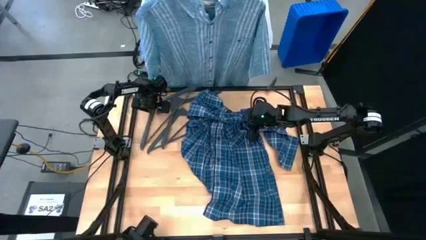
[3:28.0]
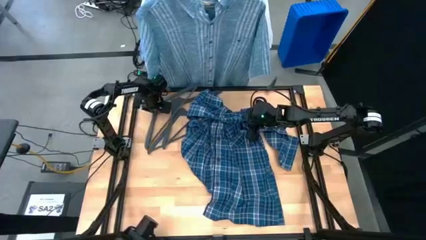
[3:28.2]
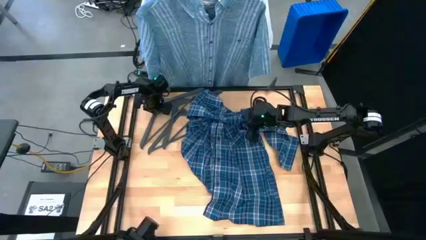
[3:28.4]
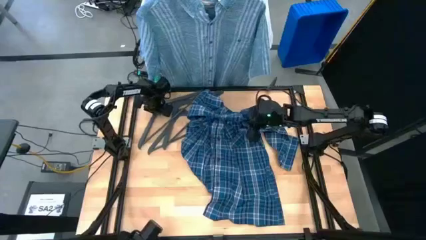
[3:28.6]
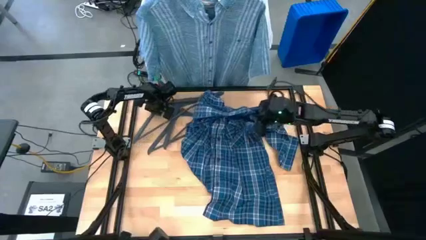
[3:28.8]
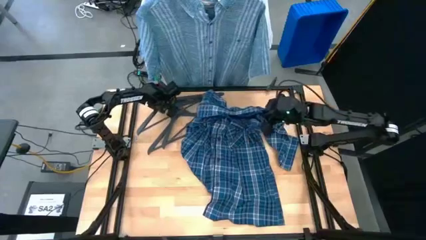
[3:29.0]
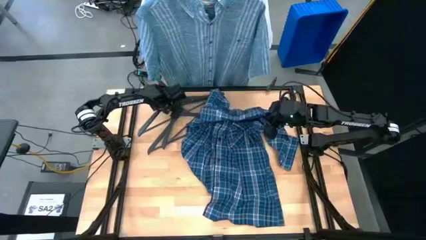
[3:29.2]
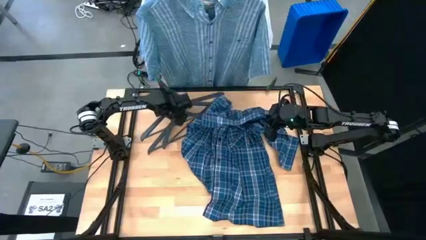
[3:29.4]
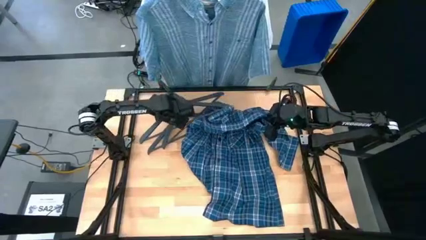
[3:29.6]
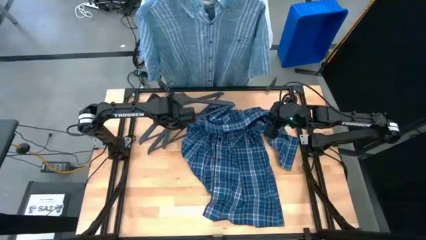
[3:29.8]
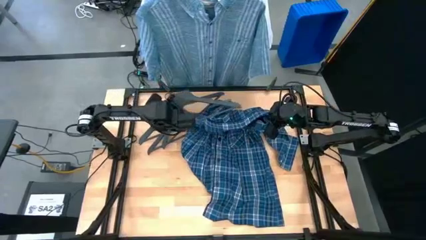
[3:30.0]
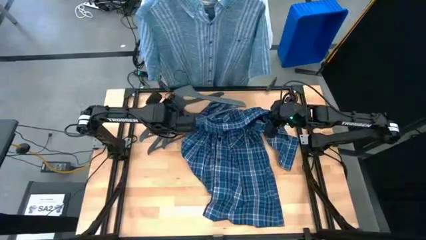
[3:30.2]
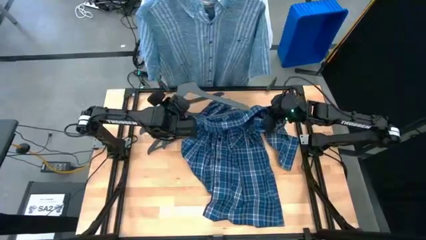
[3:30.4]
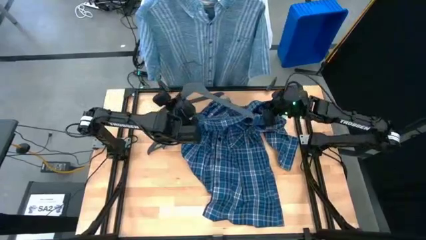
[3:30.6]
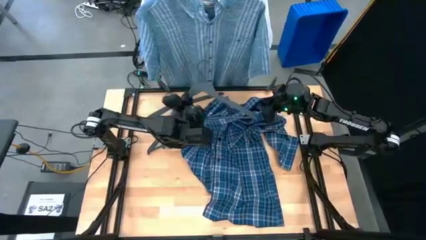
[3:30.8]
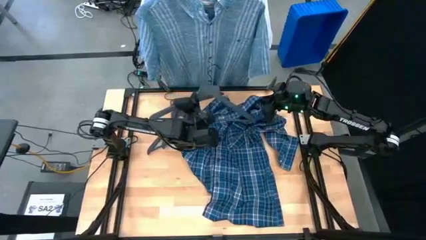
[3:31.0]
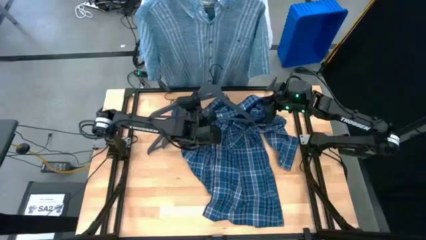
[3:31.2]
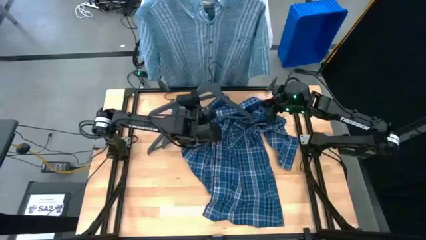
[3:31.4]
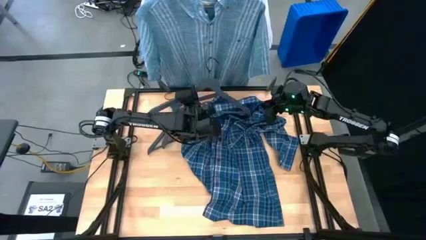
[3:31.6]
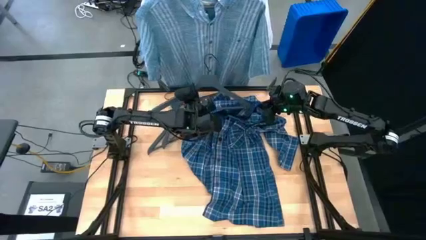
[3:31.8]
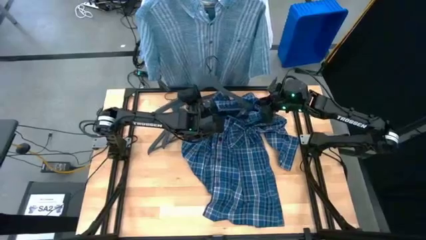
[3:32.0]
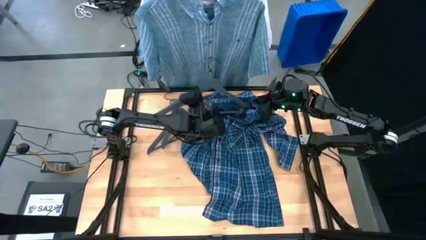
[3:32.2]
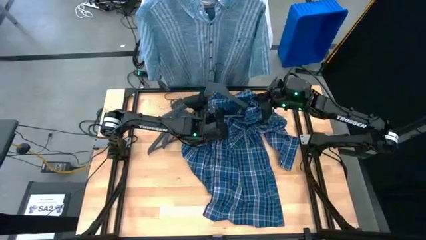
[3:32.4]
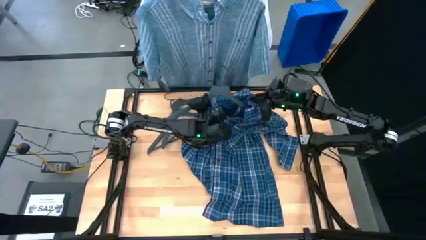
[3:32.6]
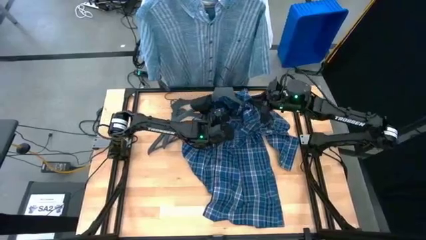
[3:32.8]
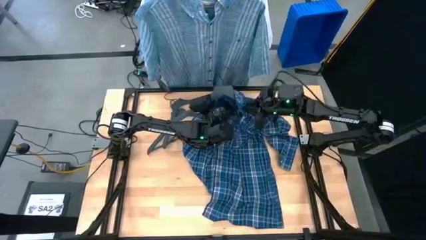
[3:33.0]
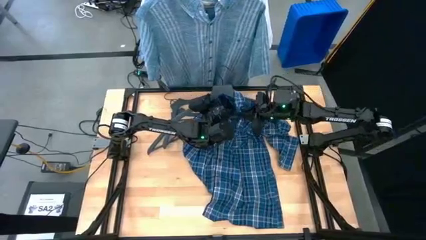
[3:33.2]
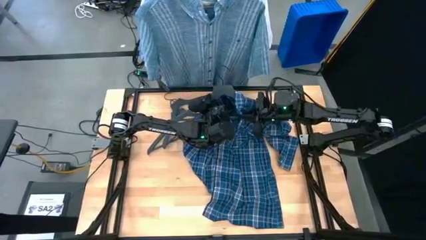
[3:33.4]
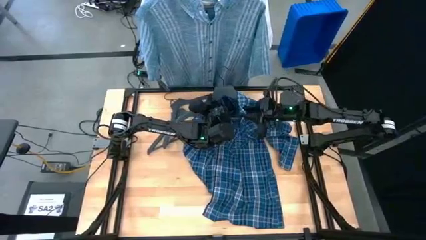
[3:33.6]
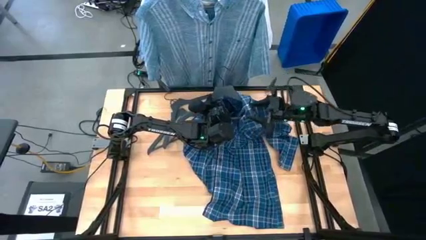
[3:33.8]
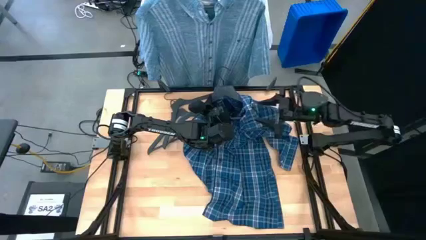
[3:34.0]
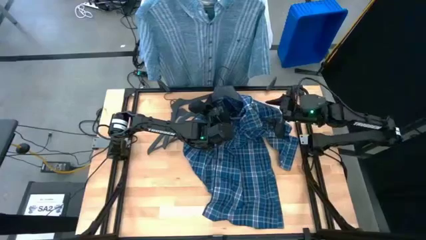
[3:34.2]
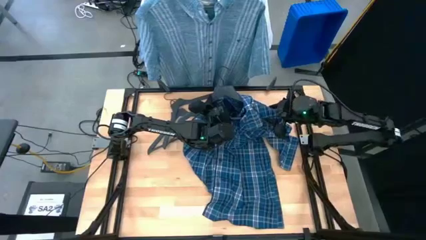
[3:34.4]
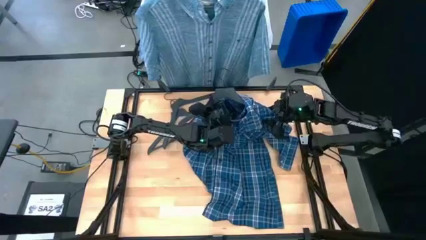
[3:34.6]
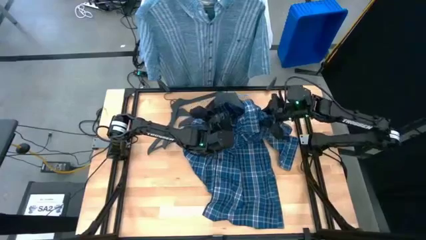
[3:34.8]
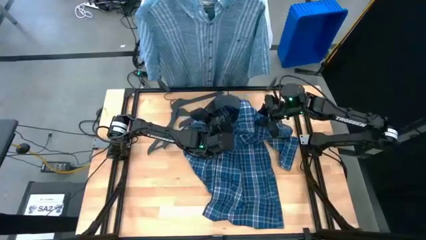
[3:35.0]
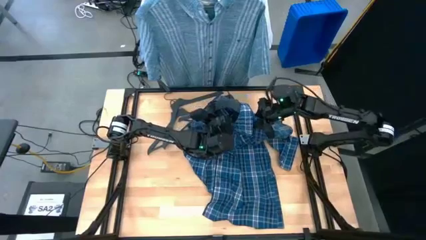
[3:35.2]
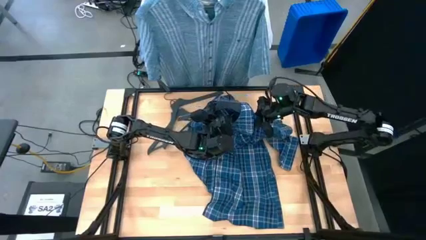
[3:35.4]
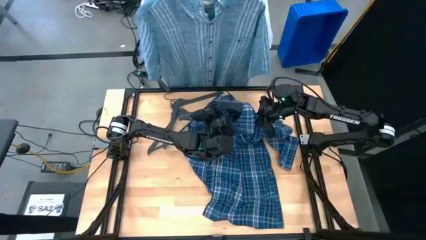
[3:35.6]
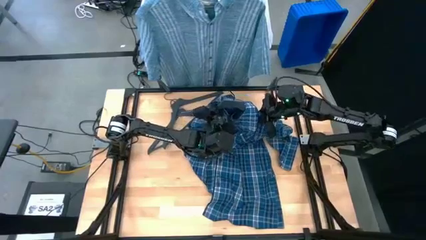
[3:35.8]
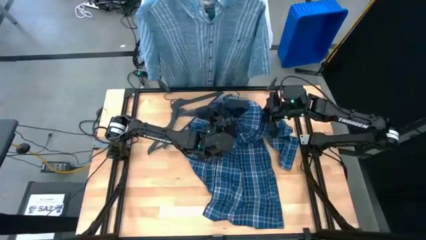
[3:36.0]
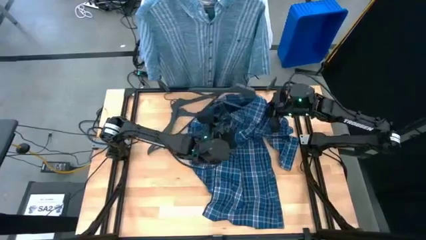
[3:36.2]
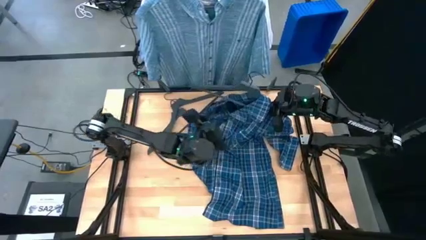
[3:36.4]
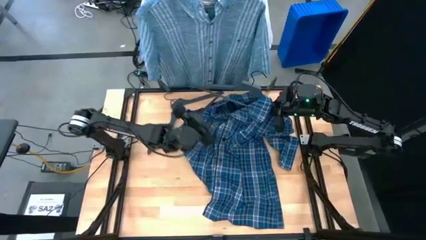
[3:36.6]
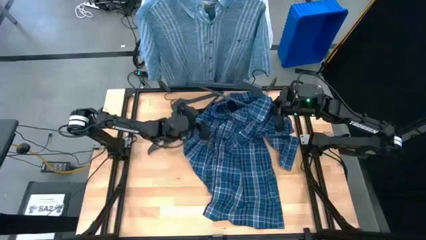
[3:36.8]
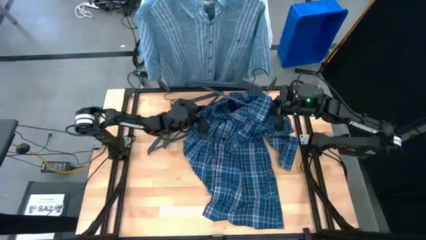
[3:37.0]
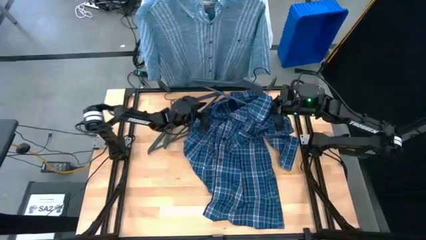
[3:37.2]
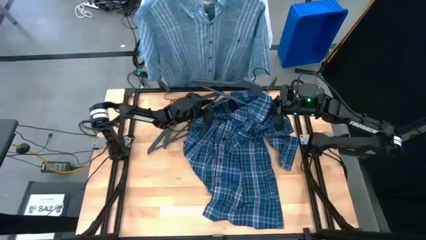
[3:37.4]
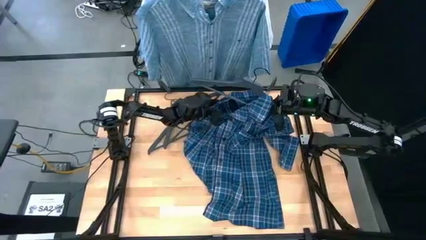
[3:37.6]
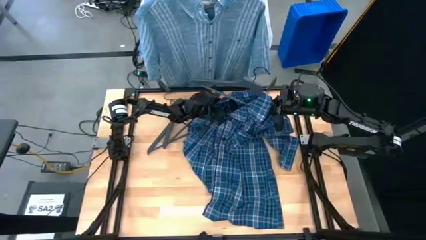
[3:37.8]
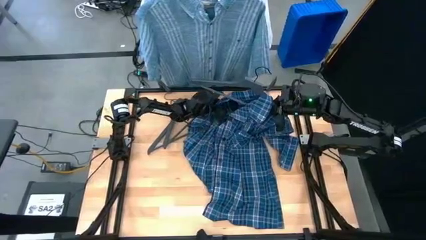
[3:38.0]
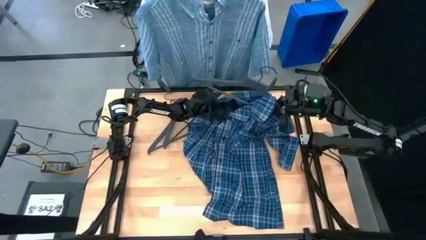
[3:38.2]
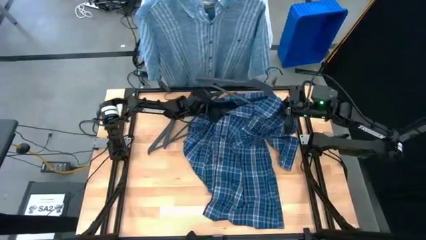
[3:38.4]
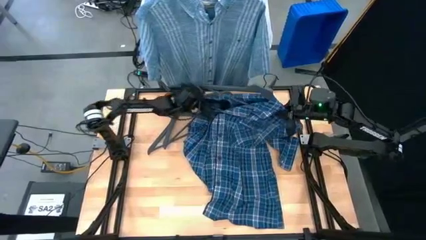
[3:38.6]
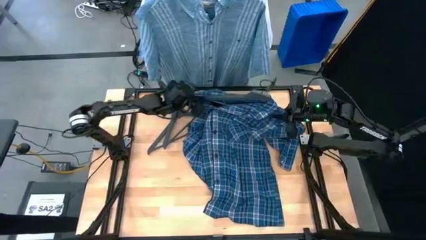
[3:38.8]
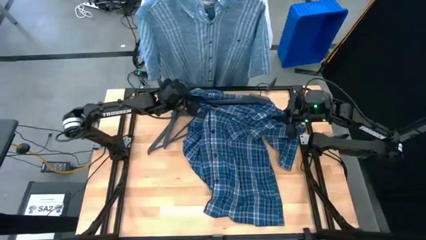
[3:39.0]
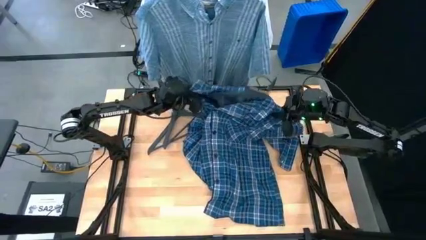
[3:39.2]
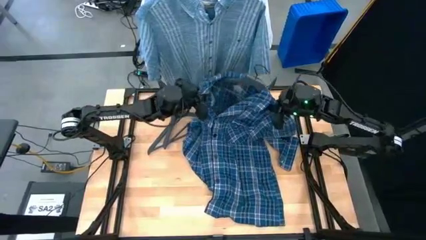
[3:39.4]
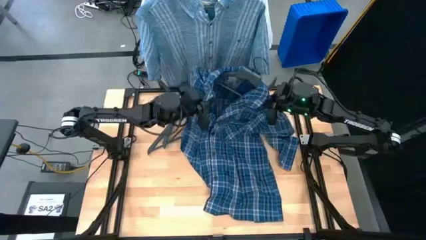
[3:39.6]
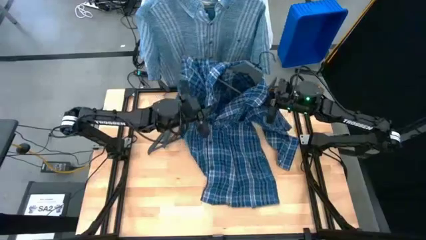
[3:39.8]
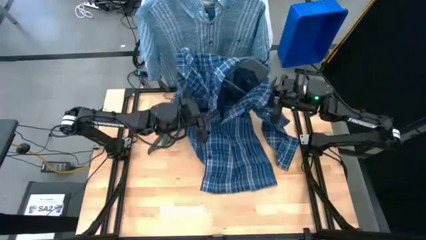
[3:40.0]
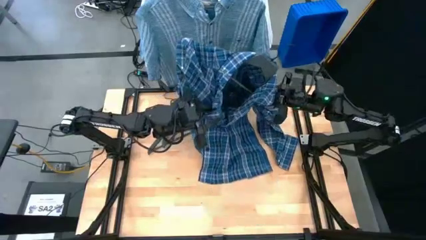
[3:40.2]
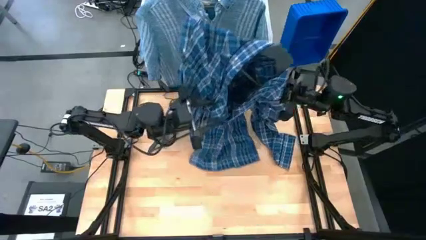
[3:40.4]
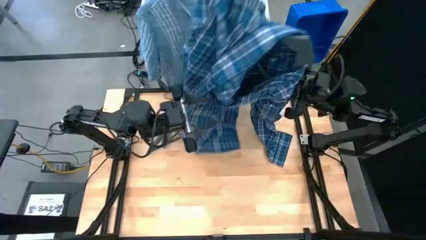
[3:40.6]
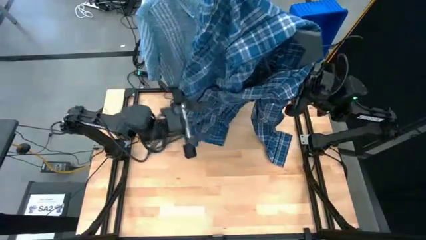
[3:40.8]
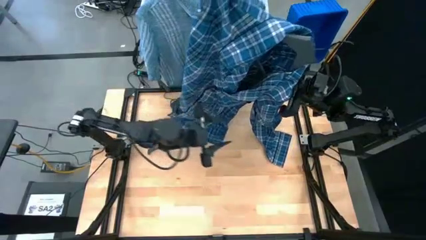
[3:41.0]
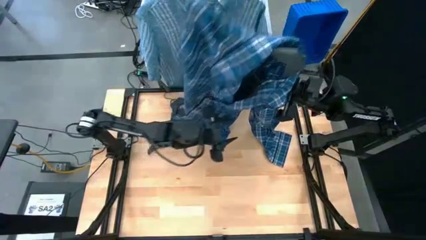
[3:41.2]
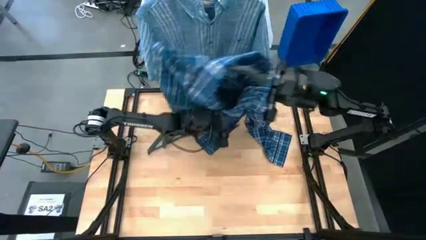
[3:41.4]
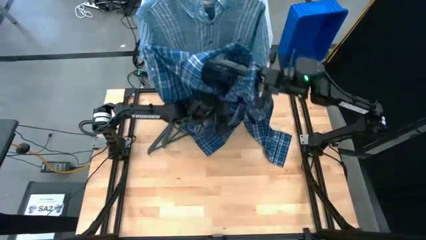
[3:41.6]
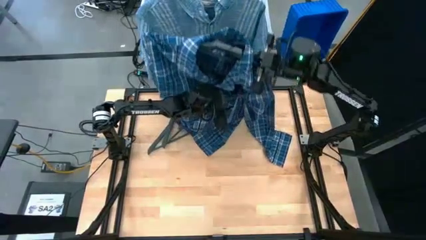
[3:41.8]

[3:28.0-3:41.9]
Task: Hang clothes
Insert the black hanger into the blue shirt

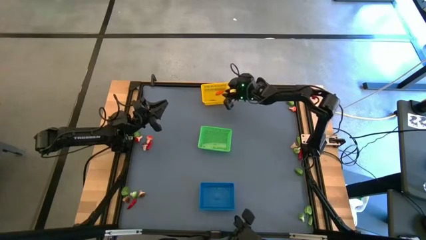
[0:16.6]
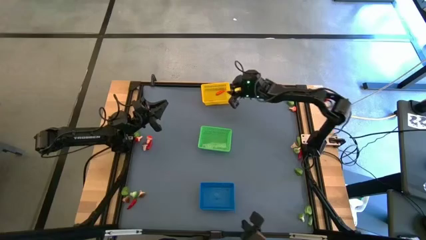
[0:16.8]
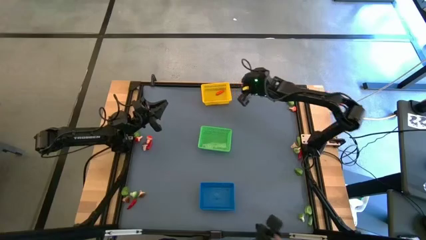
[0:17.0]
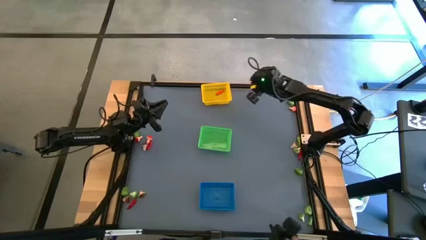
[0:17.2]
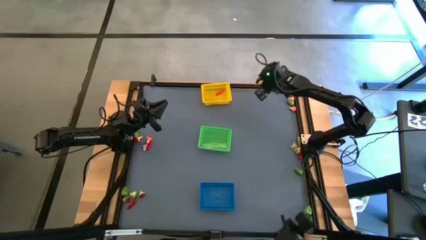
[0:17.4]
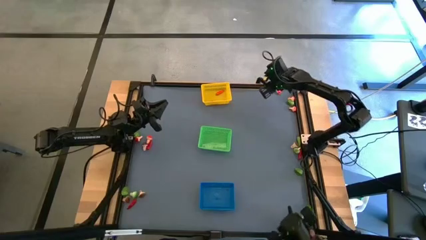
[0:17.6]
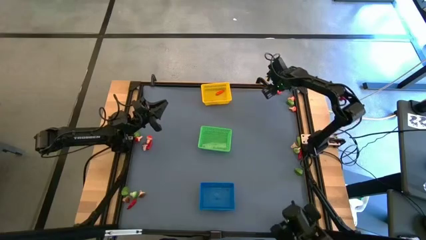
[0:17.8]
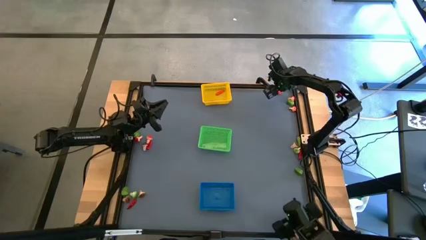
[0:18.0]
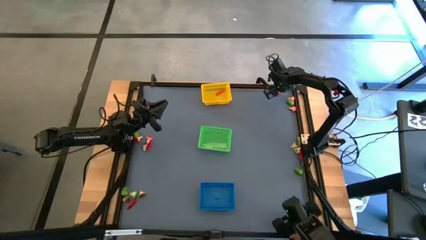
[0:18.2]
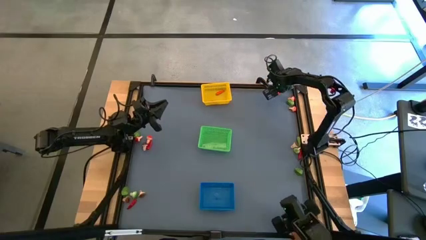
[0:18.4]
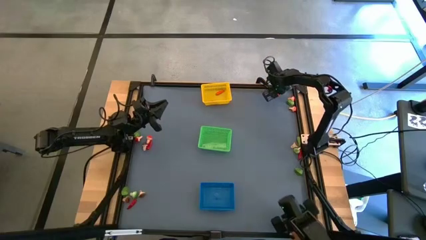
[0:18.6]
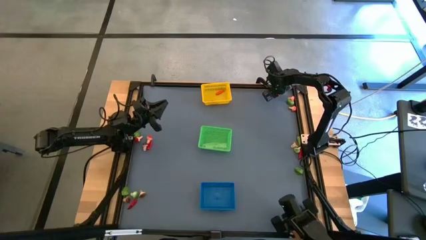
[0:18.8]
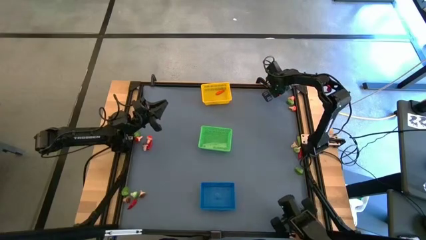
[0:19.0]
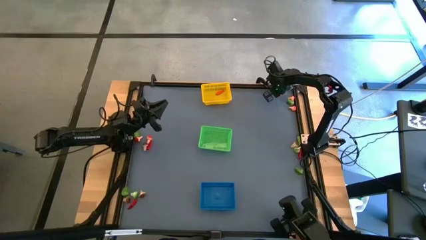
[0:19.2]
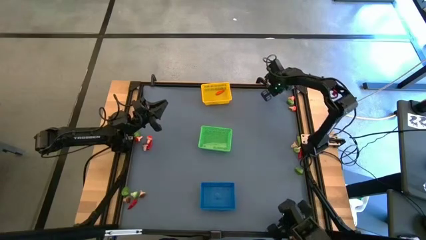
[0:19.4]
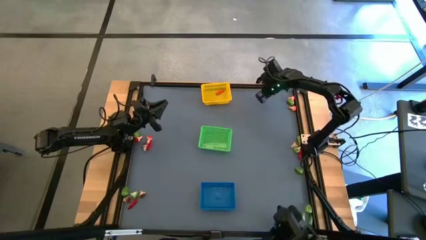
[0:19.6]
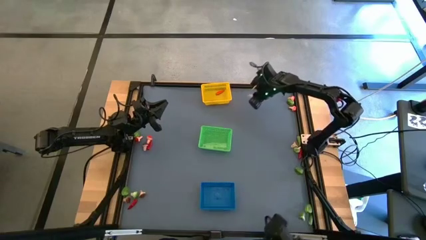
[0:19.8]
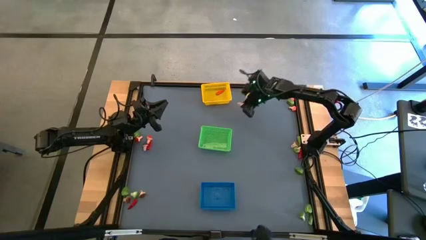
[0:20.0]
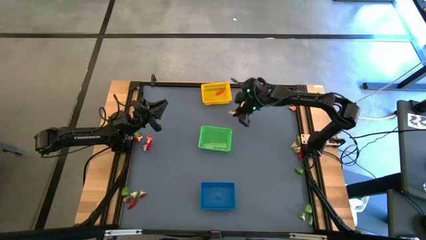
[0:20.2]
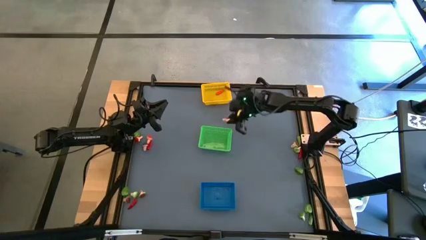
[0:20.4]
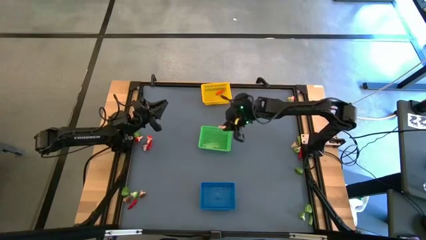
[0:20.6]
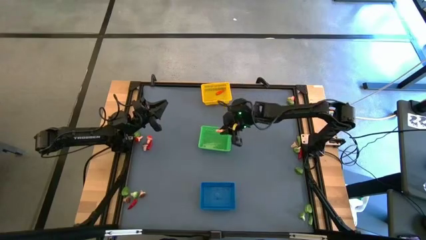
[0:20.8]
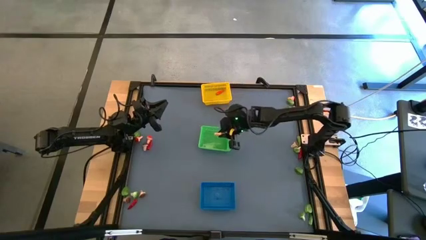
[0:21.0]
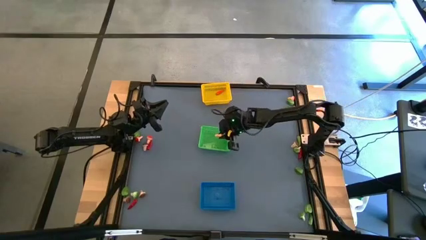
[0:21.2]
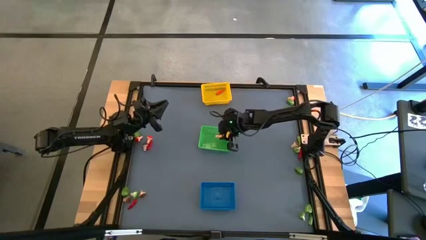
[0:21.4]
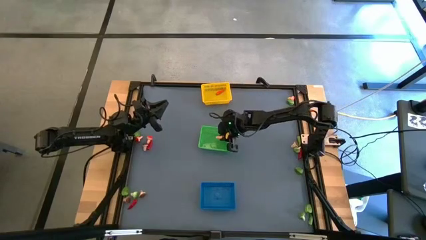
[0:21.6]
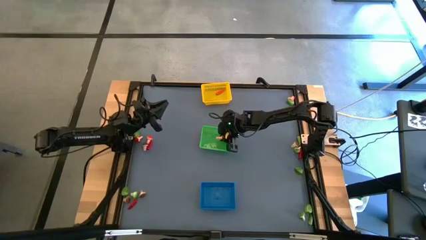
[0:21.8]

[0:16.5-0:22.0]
Task: Sort produce into baskets
Put the red mushroom into the green bin
